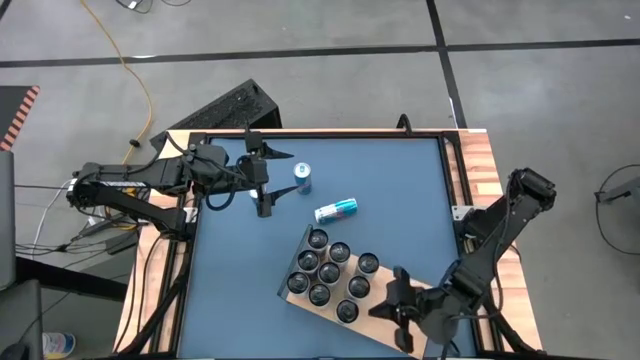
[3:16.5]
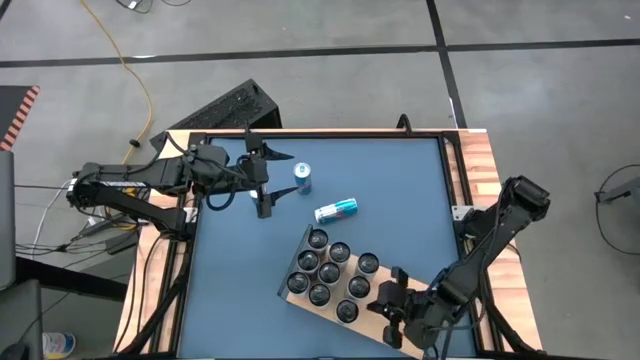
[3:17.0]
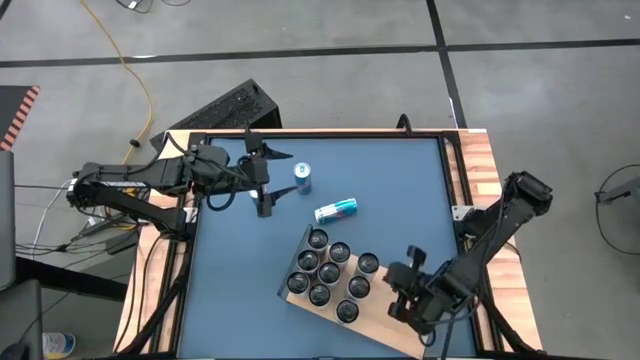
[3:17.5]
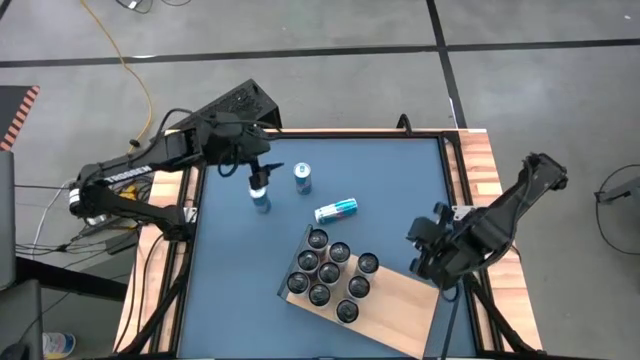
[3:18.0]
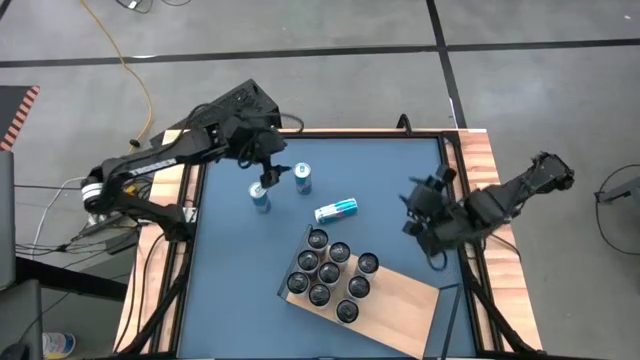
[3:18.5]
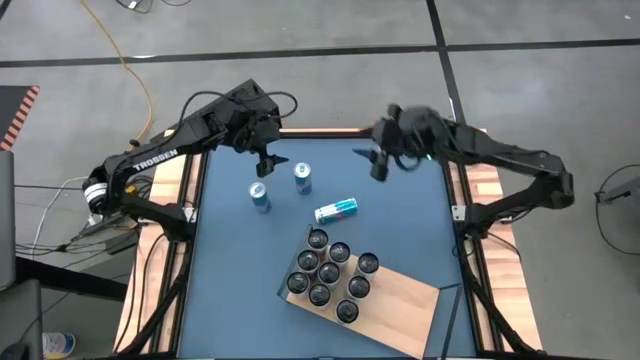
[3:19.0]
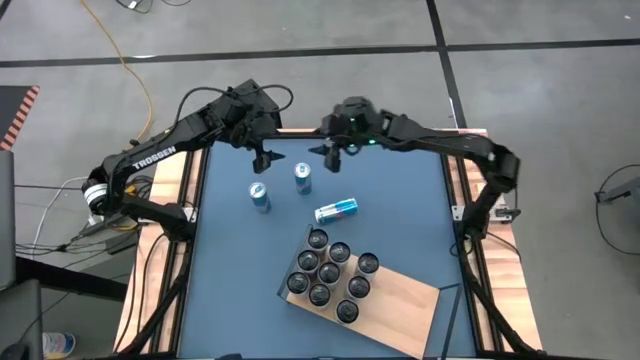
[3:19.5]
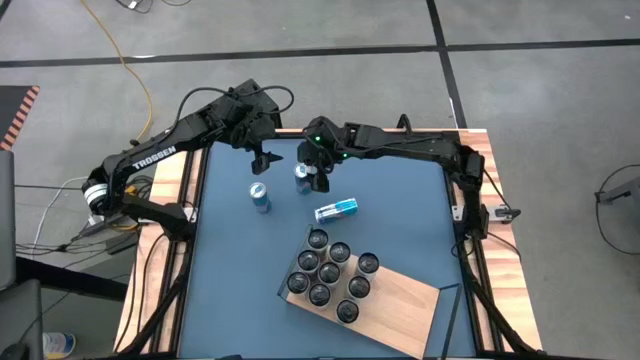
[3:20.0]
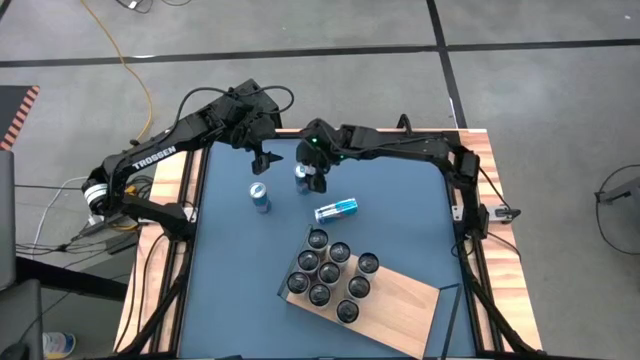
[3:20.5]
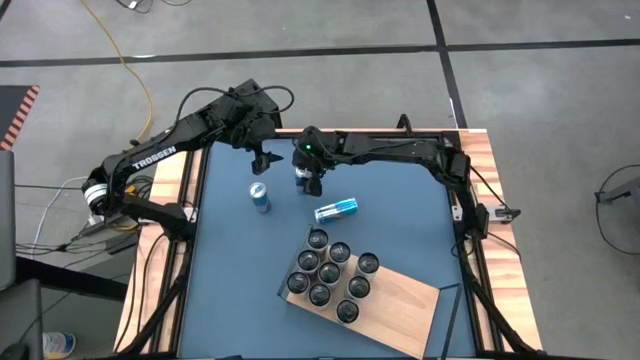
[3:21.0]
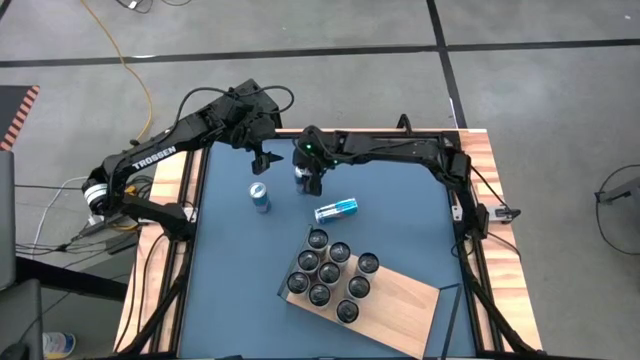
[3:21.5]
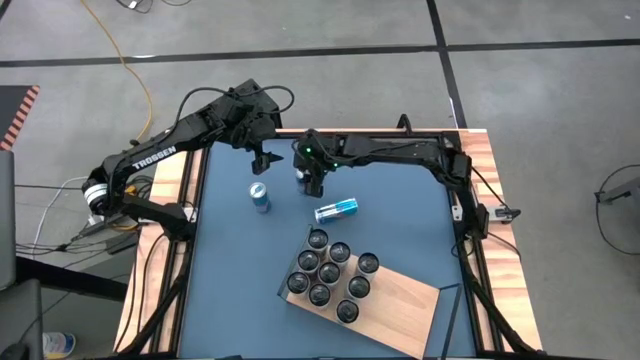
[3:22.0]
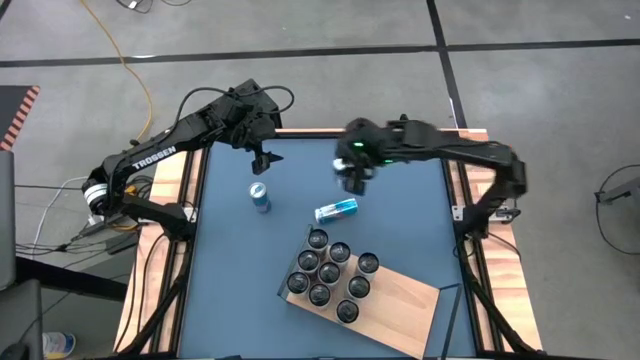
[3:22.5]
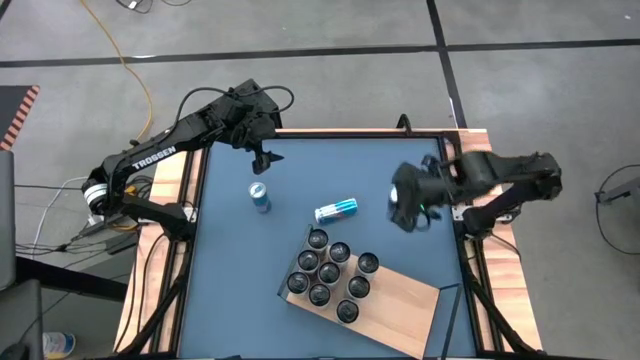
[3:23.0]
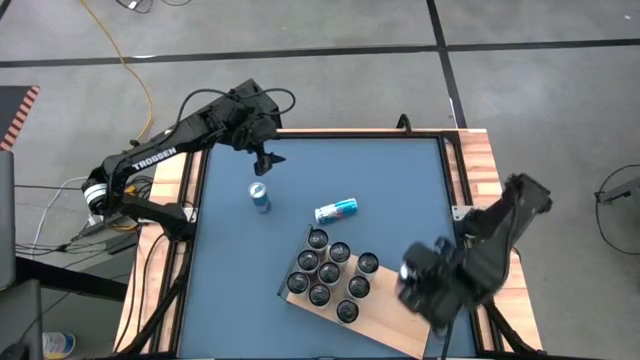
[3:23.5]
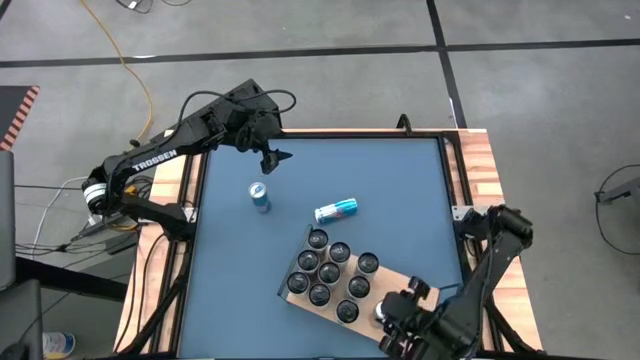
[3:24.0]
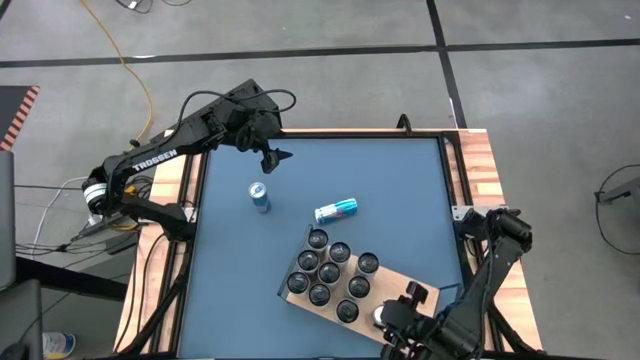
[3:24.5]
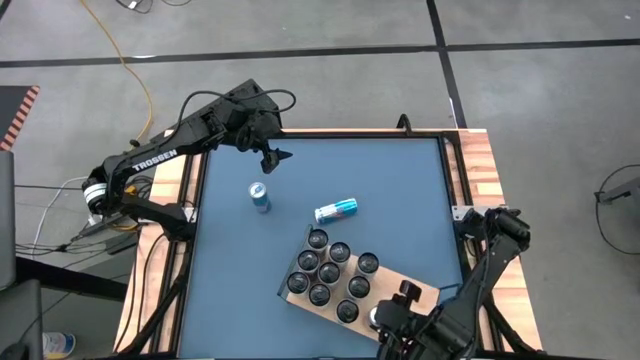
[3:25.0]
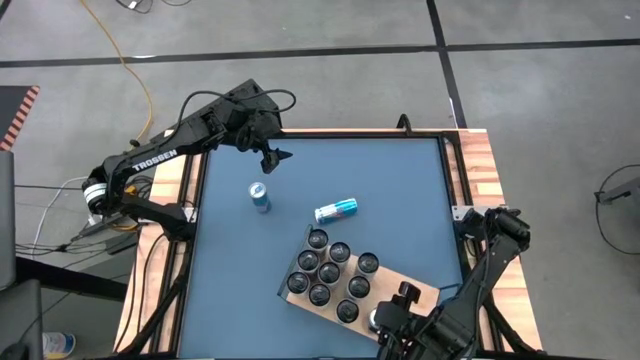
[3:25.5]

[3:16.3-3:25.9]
Task: Place canned beverage on shelf
Put the top blue soda can on the shelf

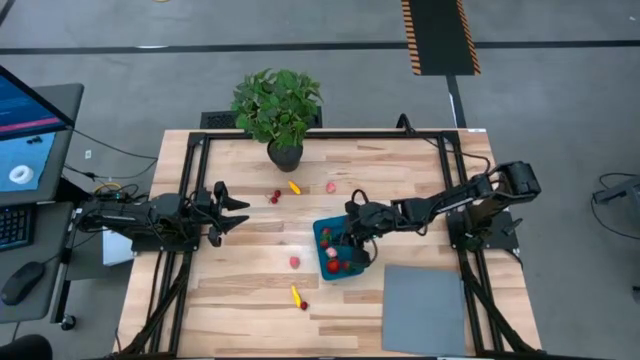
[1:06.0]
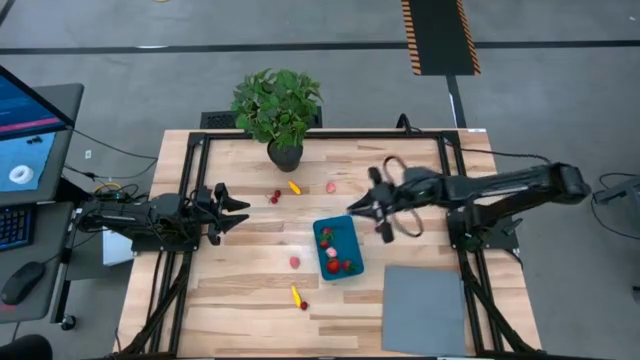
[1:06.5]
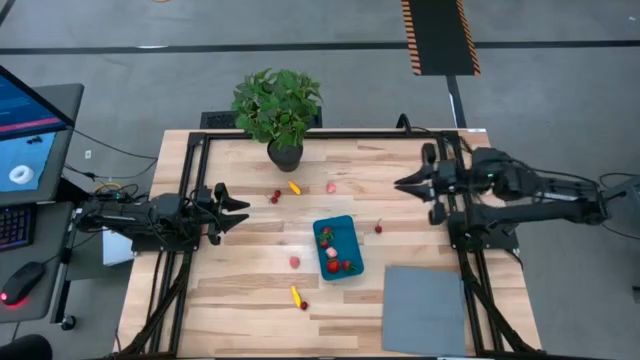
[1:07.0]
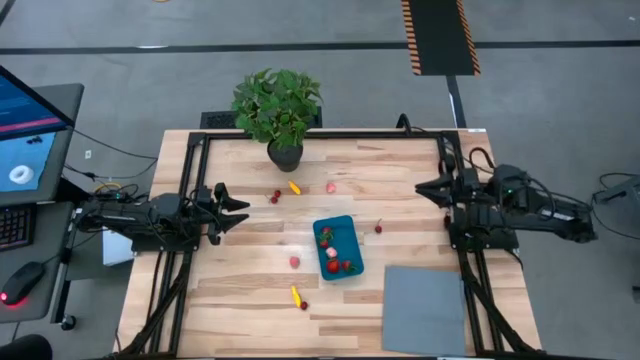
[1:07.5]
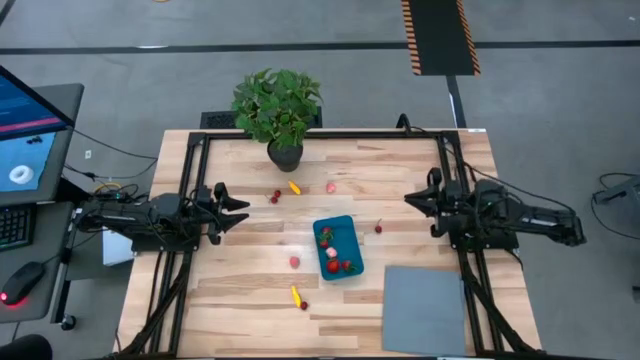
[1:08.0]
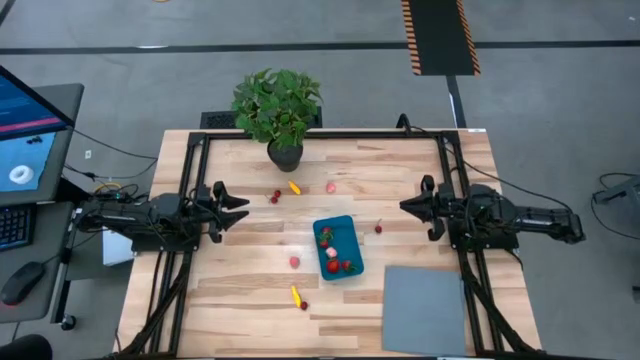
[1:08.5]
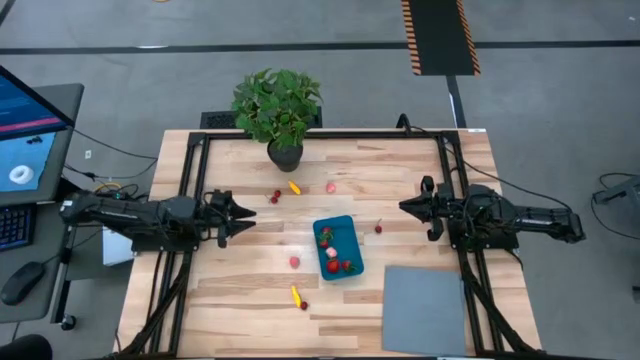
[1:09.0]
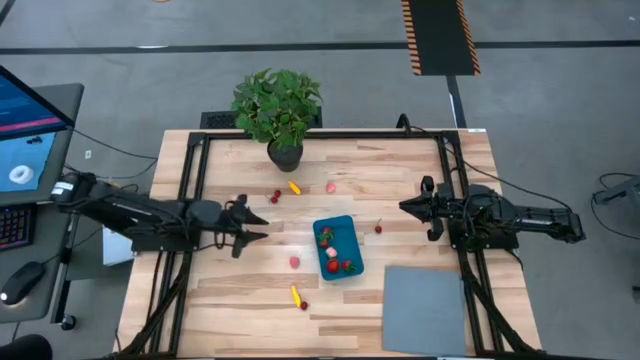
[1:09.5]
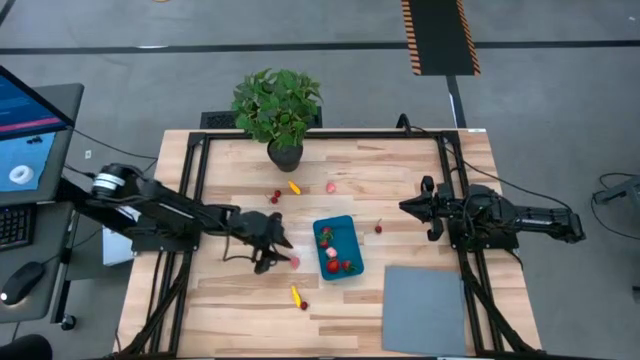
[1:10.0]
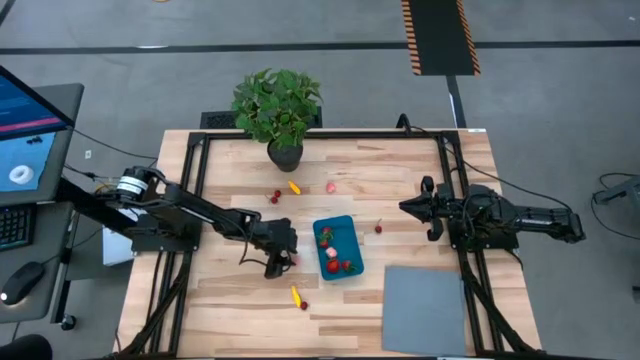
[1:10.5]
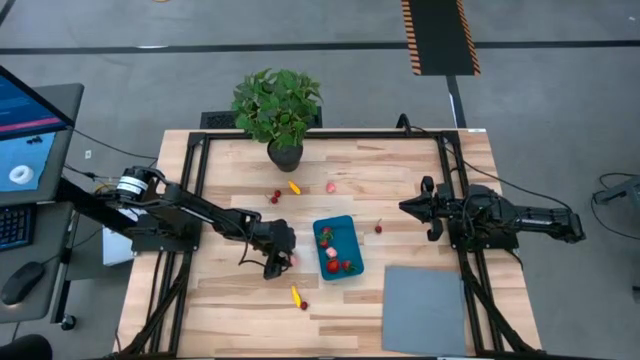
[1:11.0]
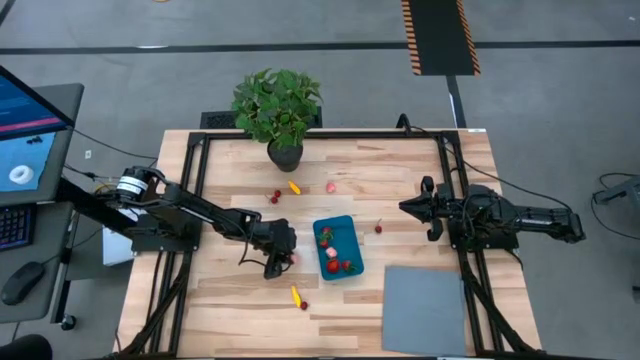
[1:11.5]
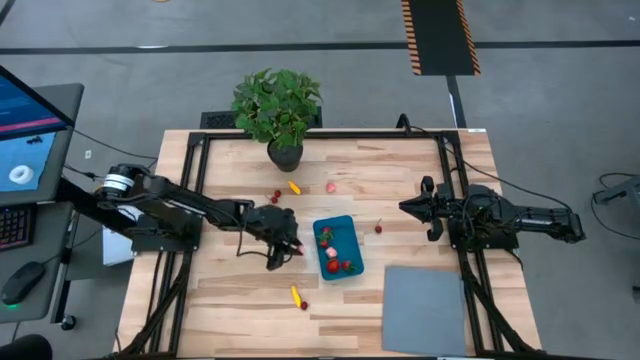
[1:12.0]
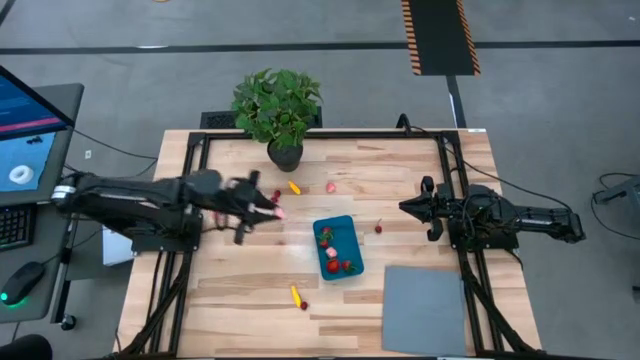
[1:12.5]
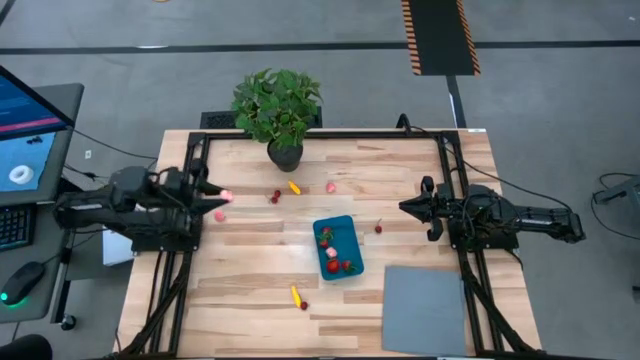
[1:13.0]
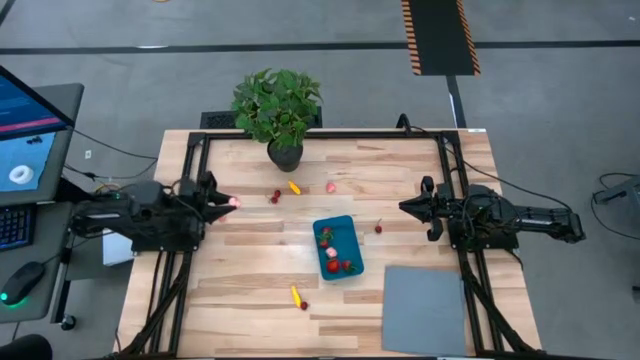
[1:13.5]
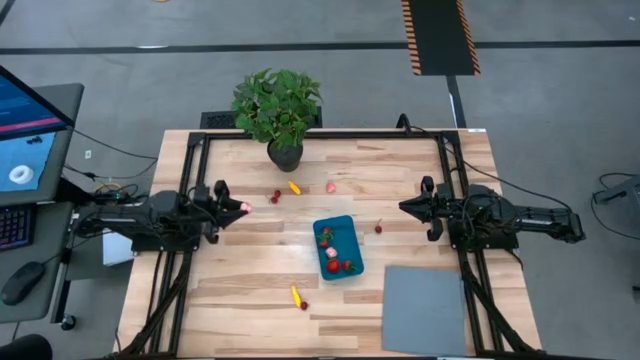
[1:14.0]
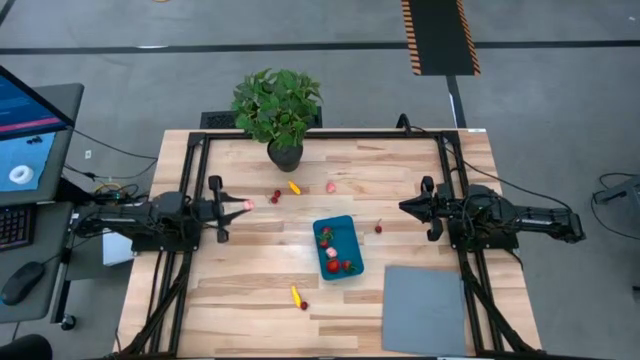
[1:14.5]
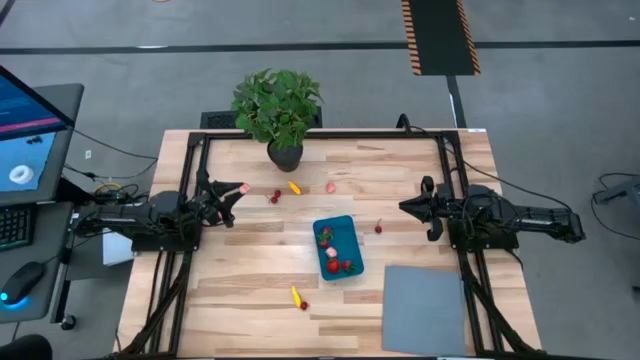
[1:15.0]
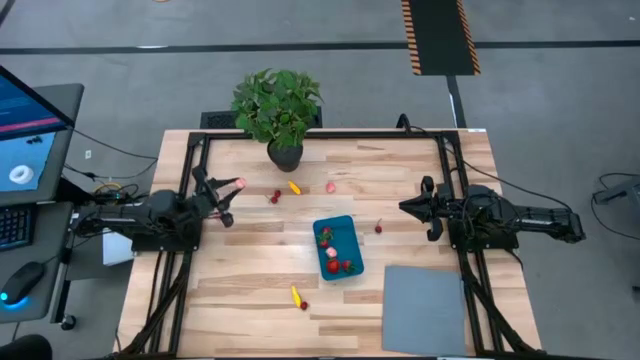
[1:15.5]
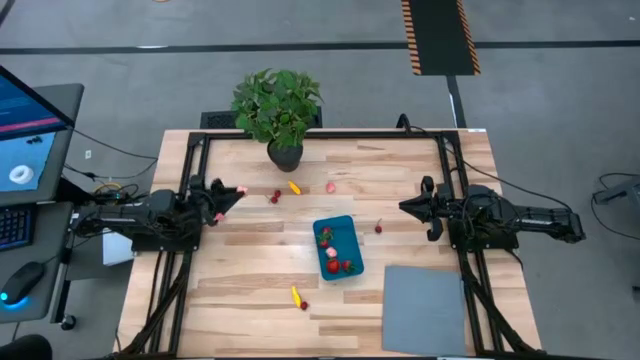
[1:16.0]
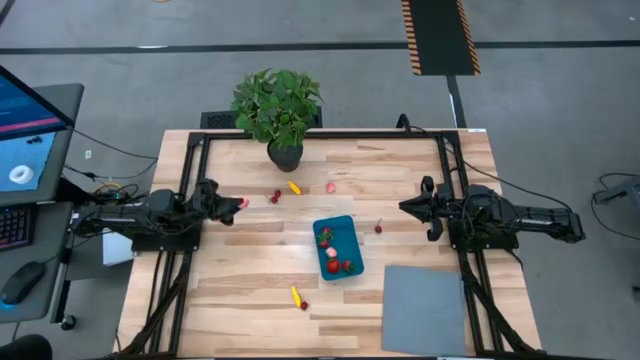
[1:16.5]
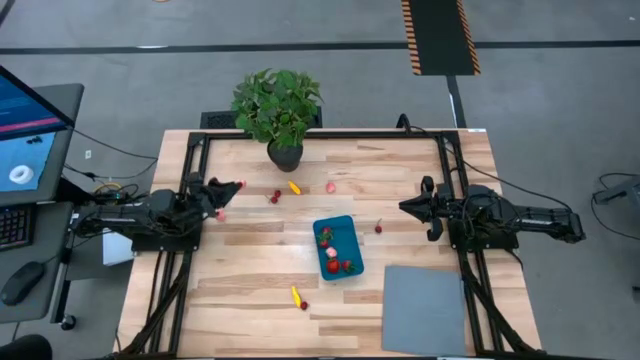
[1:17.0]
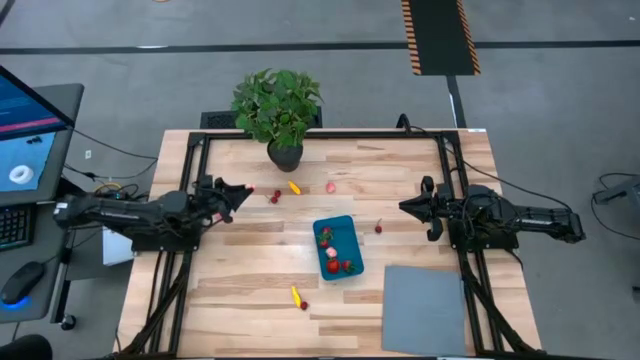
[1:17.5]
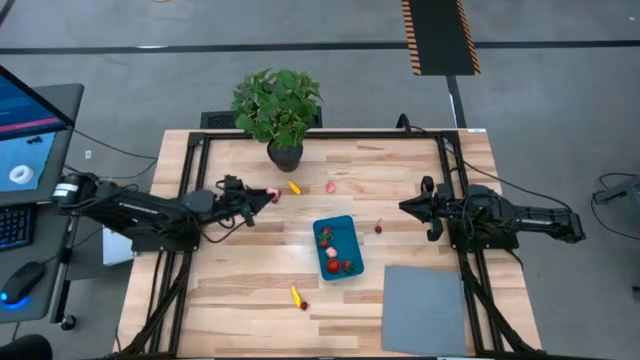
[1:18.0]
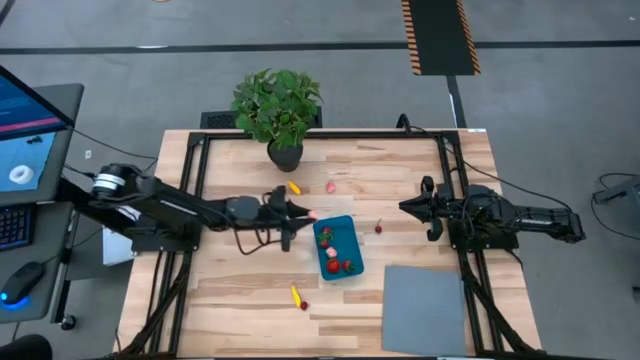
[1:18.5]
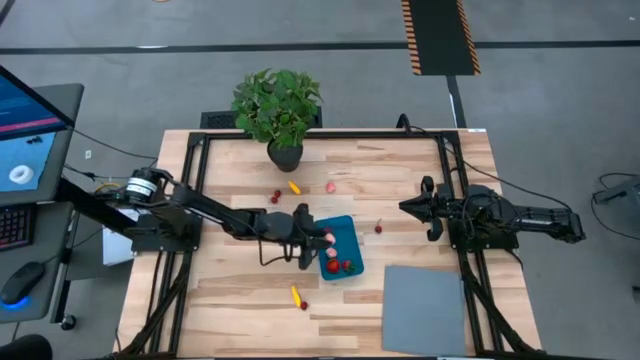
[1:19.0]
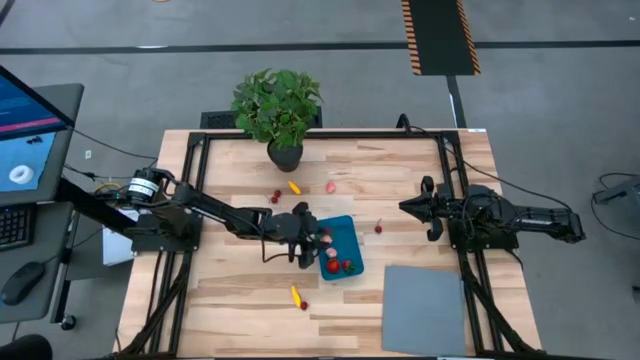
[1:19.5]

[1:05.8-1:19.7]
Task: Pick and placing Produce into tupperware
Put the bottom apricot into the blue bin
